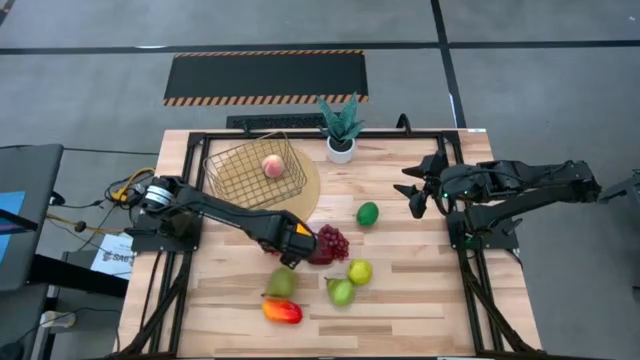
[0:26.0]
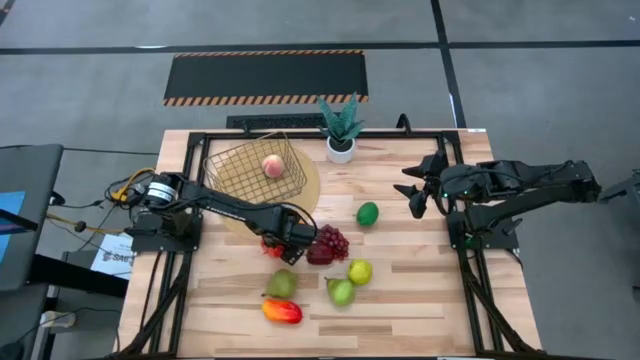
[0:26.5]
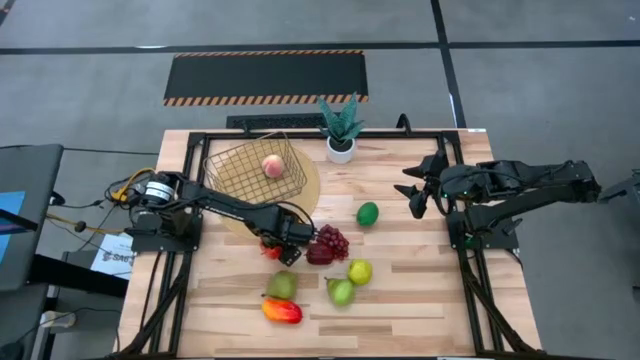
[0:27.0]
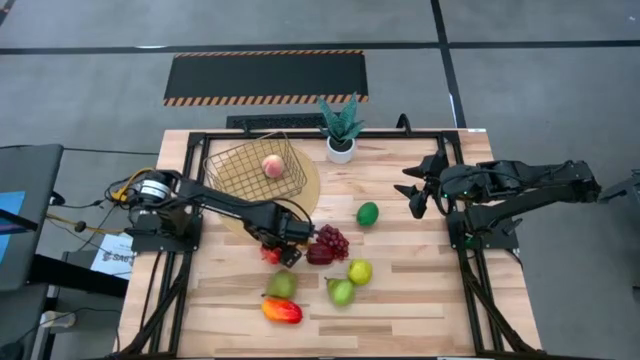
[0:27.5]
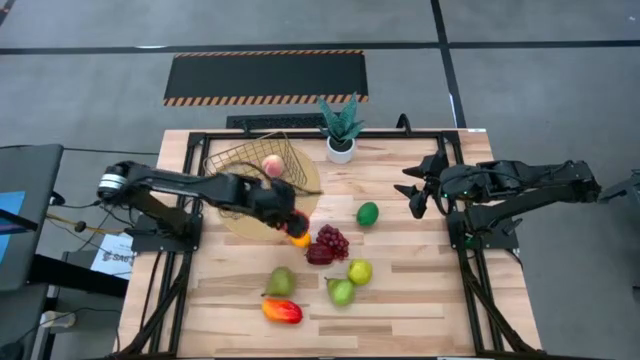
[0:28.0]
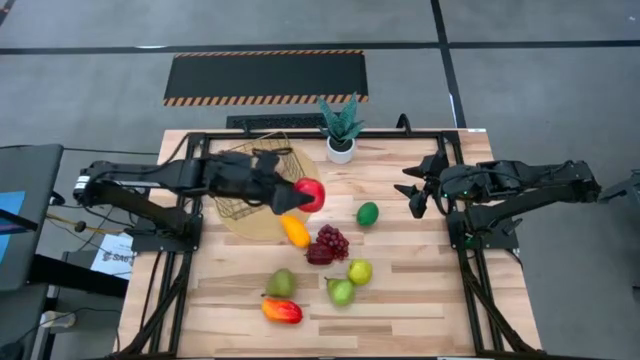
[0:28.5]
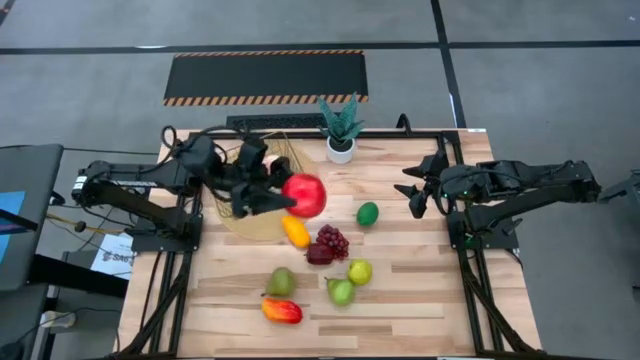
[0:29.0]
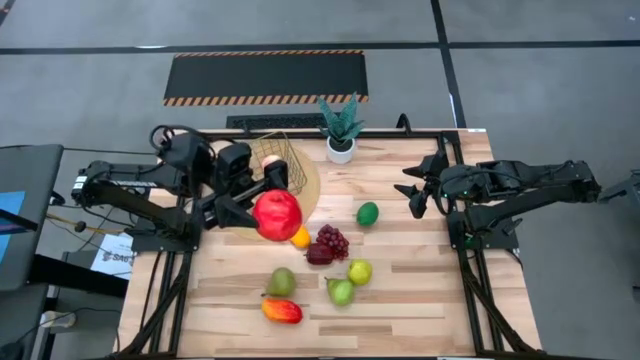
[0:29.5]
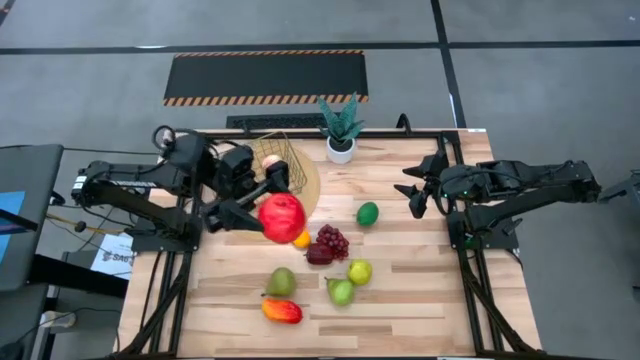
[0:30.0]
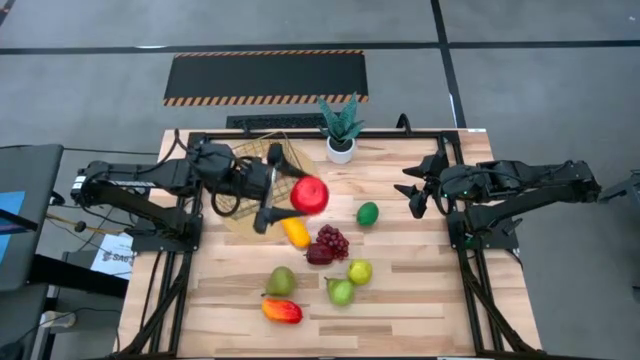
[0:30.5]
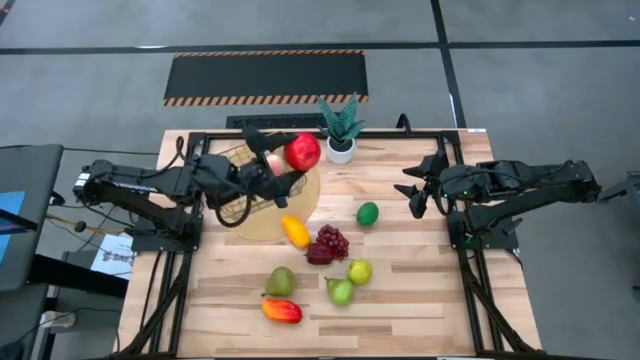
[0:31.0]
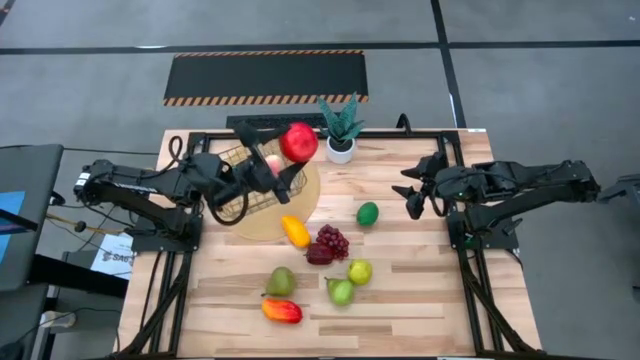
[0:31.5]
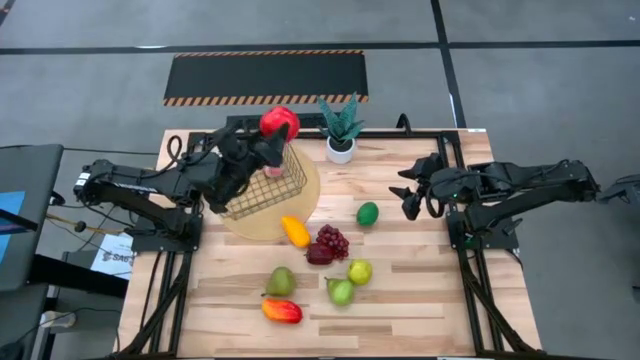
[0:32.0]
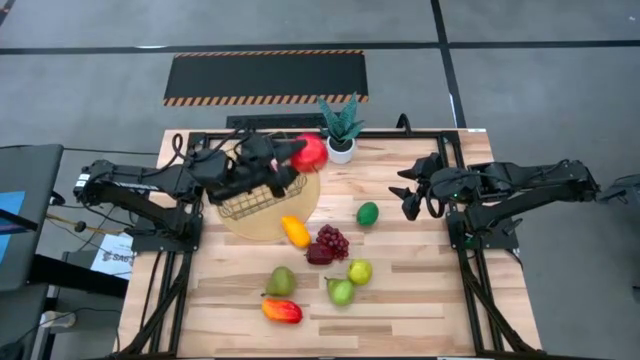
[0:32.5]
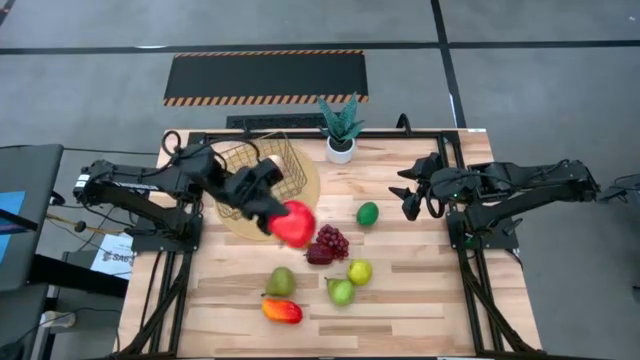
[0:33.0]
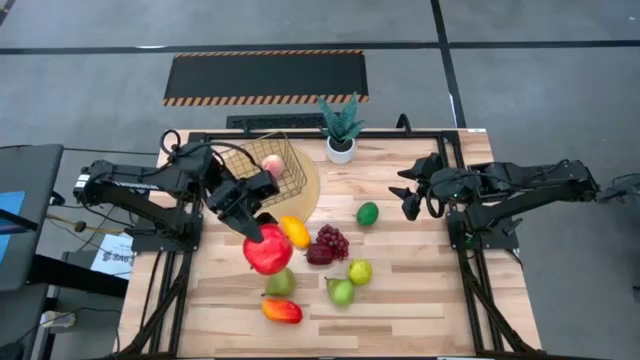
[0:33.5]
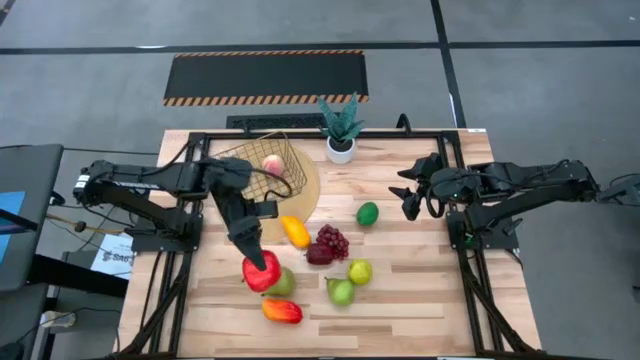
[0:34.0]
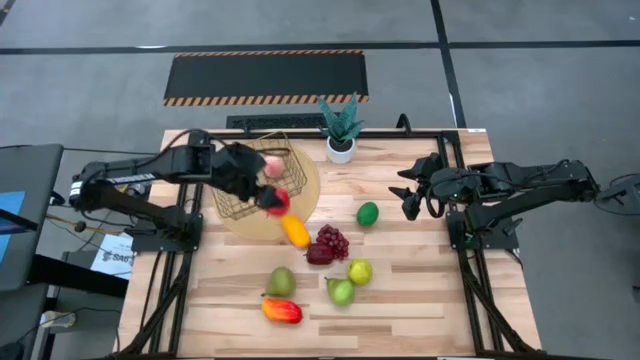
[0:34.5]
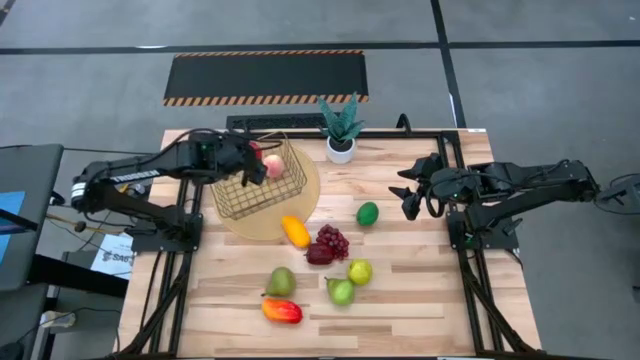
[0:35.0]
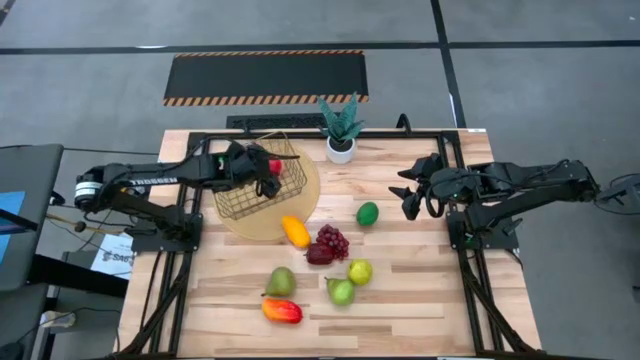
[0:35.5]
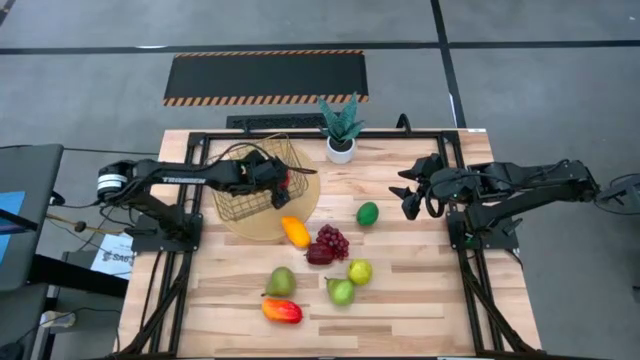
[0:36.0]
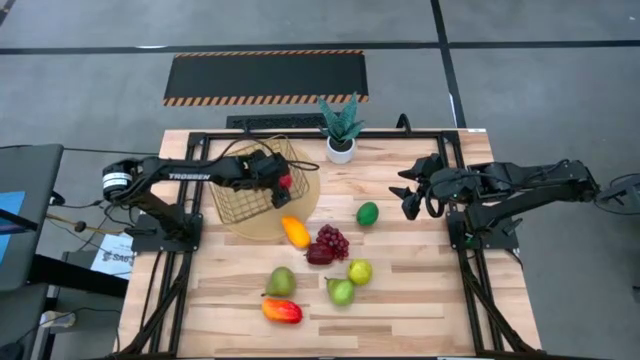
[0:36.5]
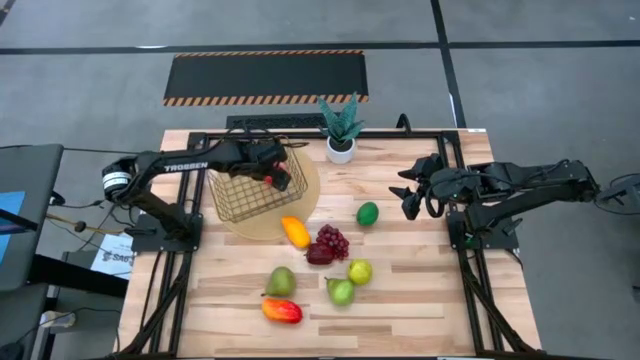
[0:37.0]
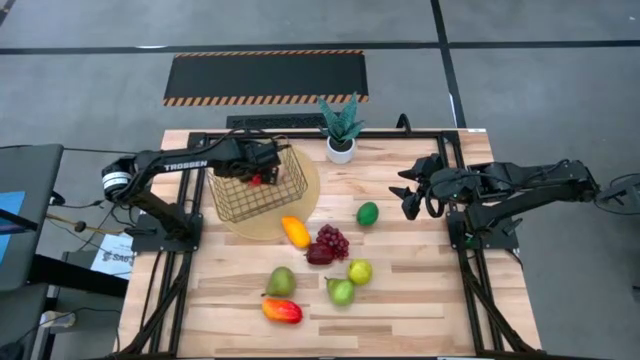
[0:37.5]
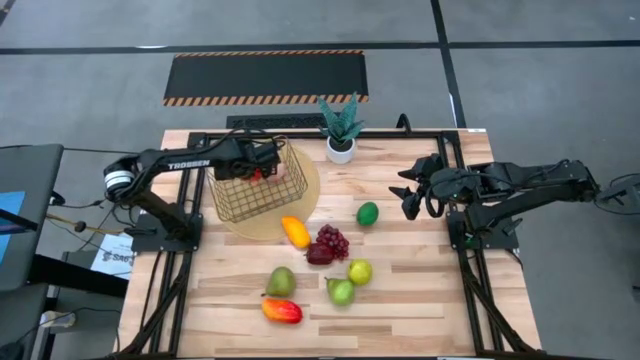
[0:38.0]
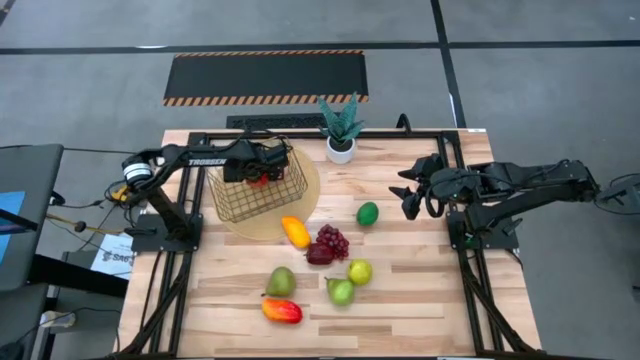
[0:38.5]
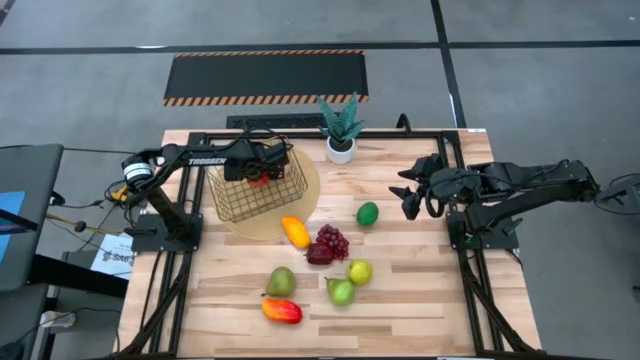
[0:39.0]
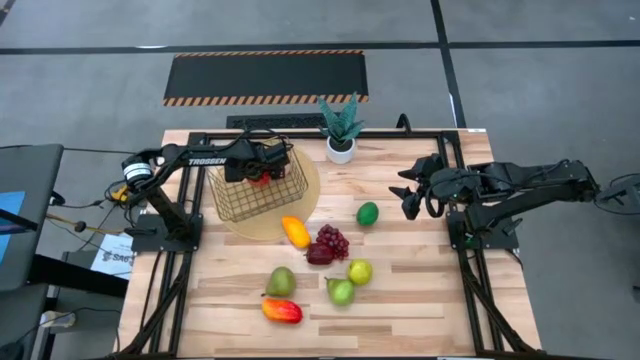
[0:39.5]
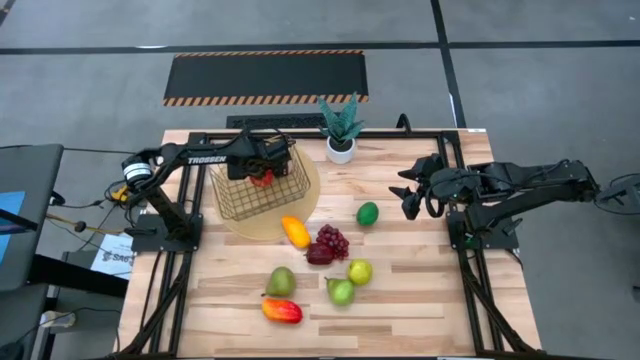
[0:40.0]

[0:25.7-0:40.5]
Task: Build produce basket
Put the red apple into the wire basket

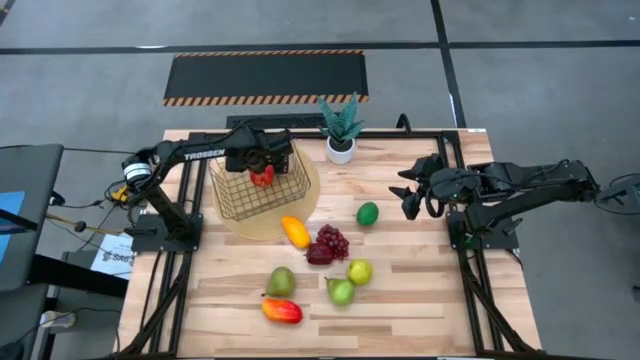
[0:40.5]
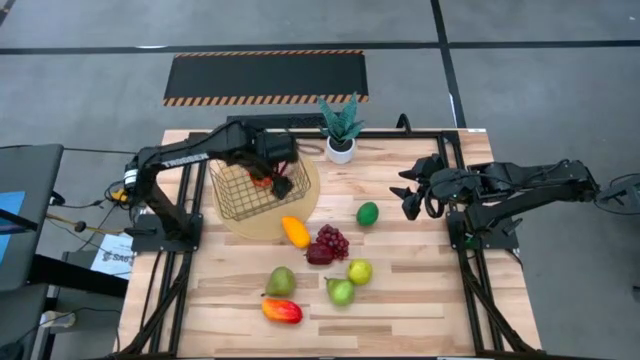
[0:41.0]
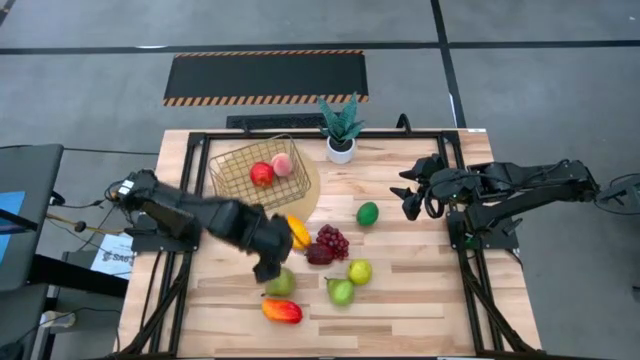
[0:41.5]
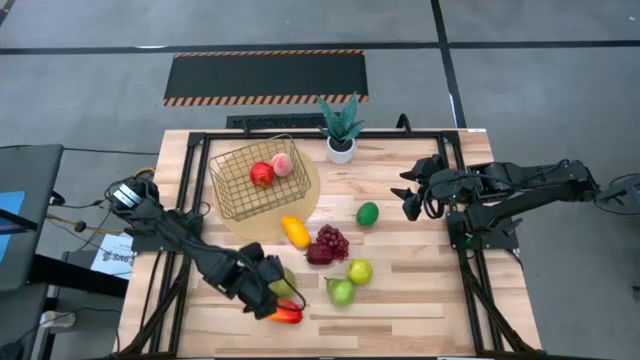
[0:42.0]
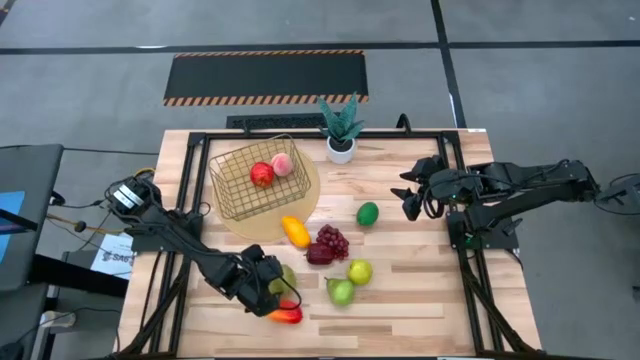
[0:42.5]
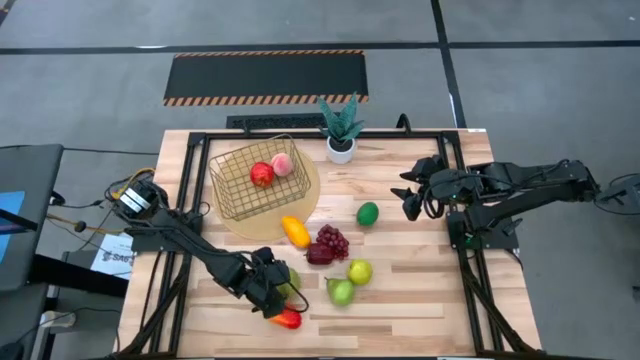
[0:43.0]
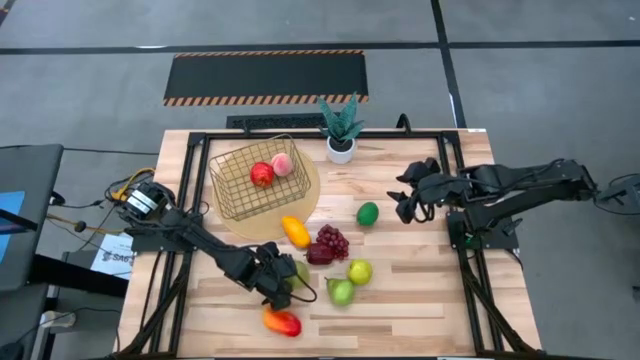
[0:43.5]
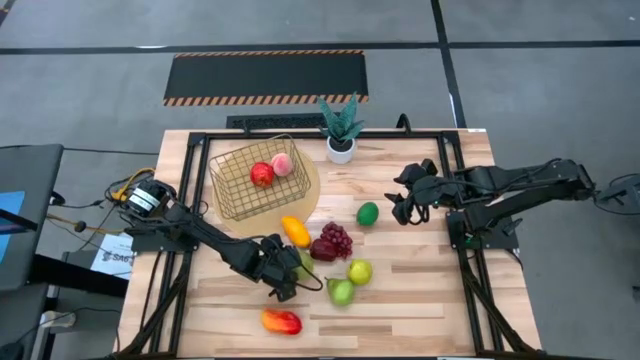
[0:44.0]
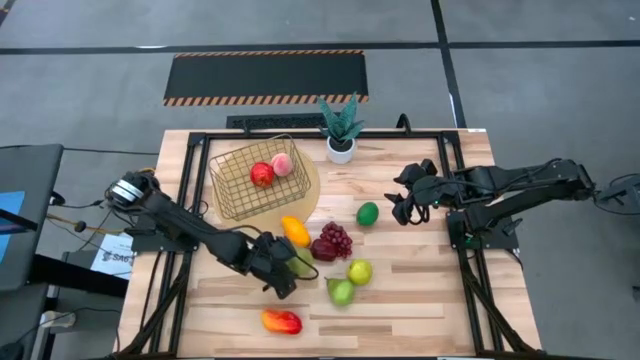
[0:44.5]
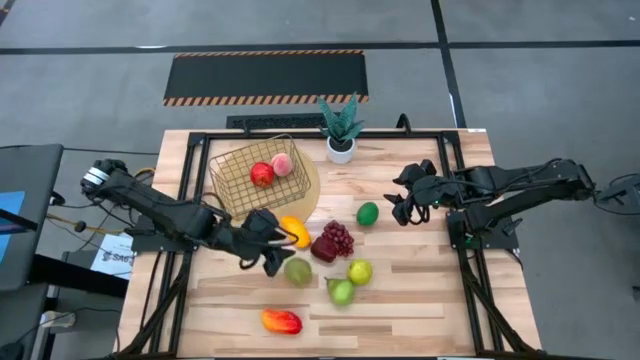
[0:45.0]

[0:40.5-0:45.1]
Put the left pear into the wire basket
